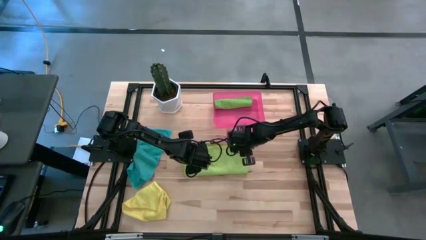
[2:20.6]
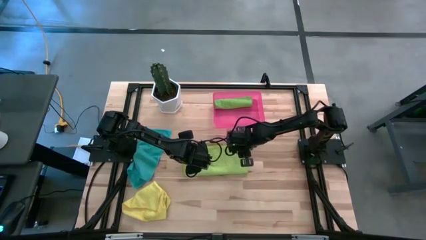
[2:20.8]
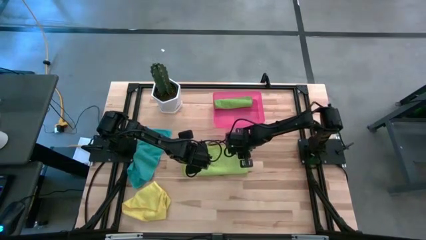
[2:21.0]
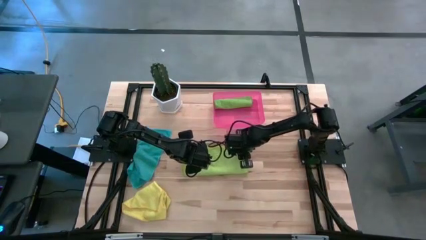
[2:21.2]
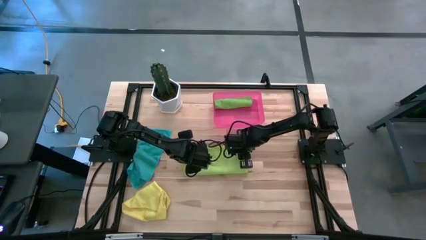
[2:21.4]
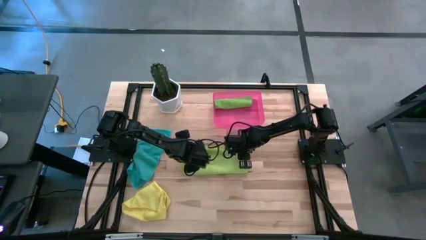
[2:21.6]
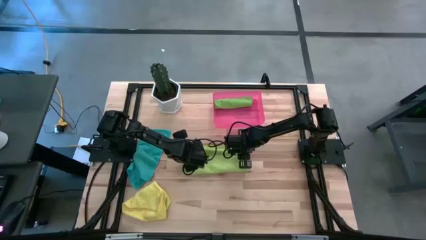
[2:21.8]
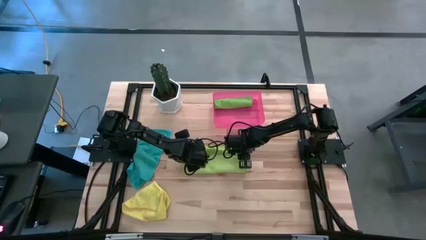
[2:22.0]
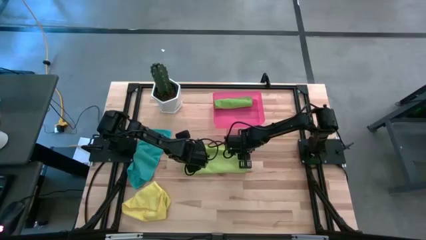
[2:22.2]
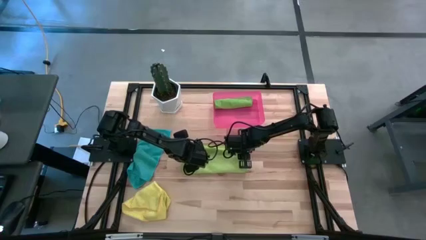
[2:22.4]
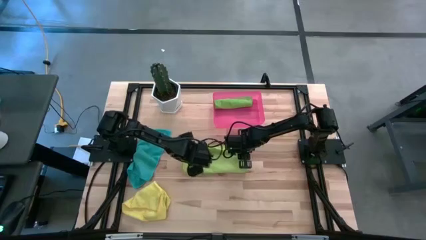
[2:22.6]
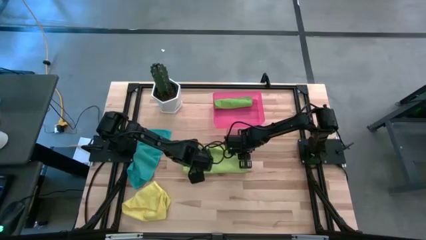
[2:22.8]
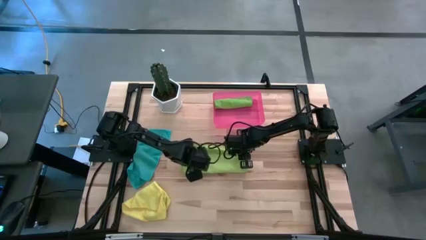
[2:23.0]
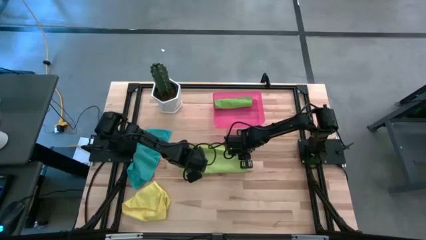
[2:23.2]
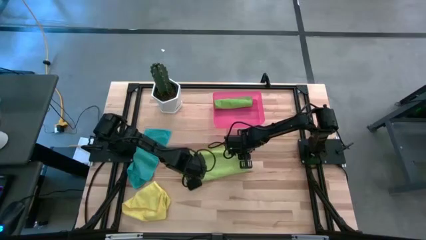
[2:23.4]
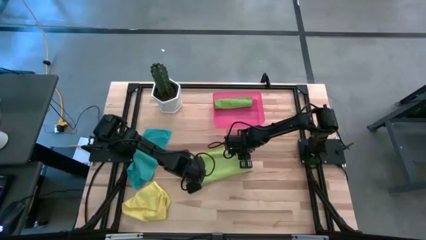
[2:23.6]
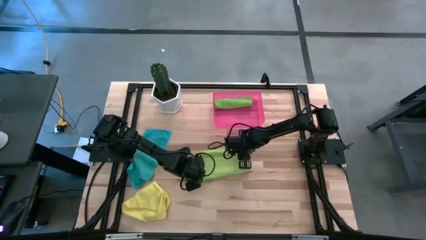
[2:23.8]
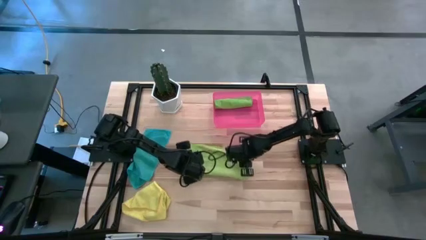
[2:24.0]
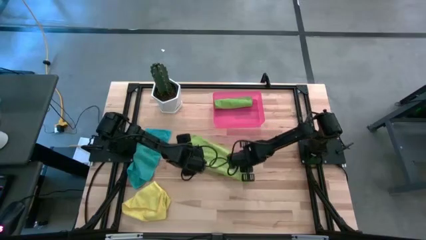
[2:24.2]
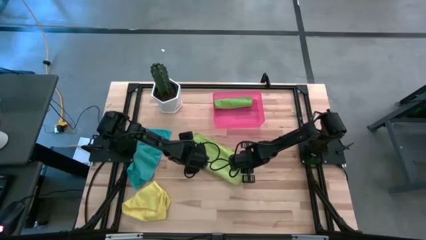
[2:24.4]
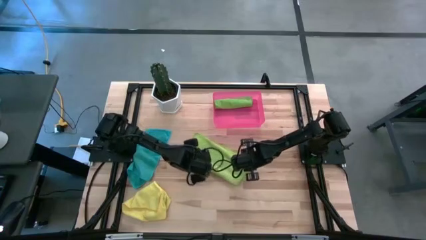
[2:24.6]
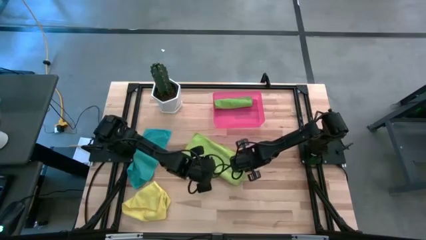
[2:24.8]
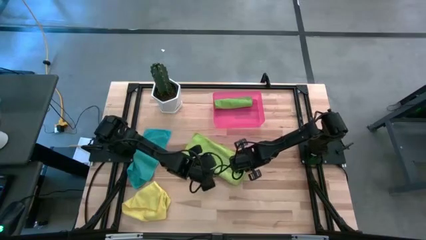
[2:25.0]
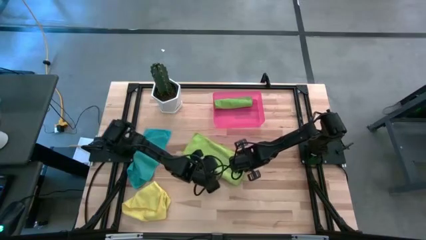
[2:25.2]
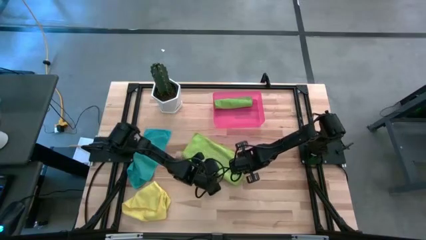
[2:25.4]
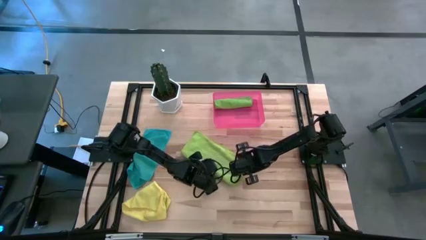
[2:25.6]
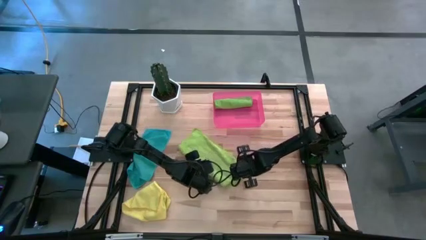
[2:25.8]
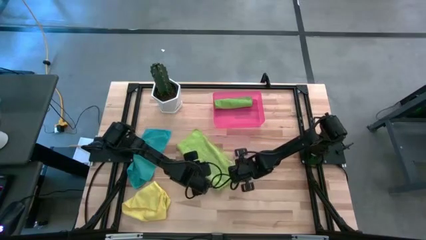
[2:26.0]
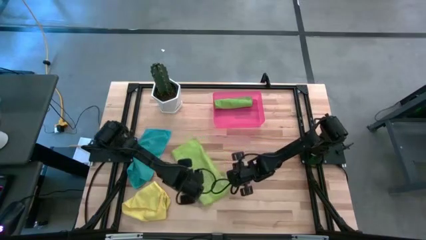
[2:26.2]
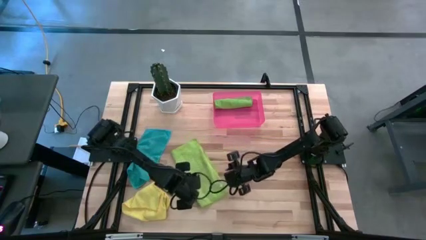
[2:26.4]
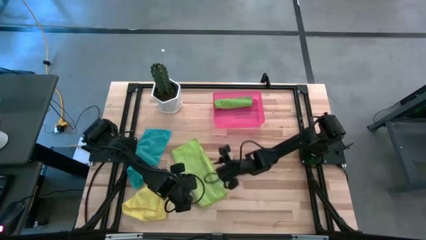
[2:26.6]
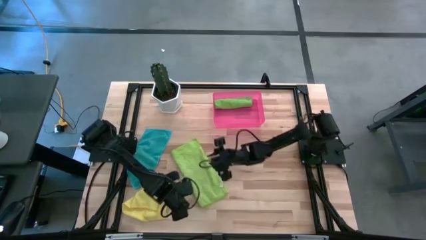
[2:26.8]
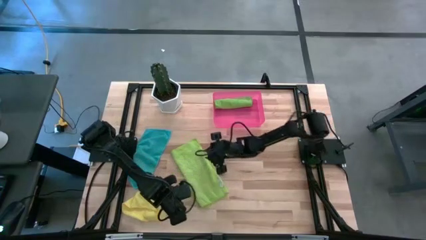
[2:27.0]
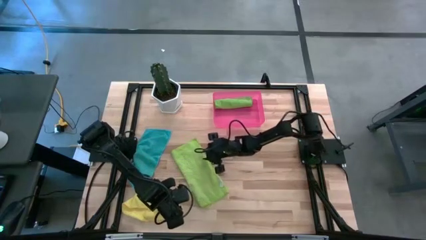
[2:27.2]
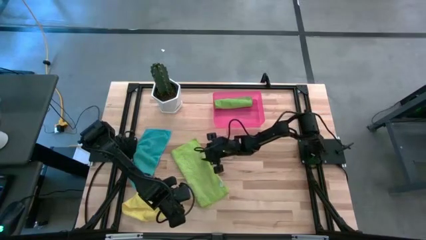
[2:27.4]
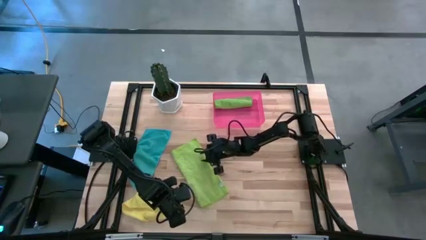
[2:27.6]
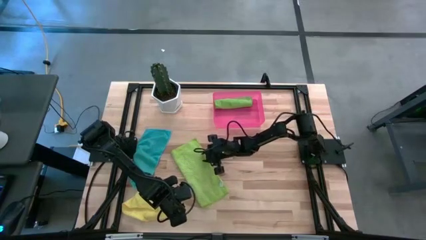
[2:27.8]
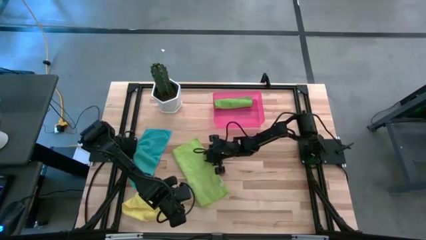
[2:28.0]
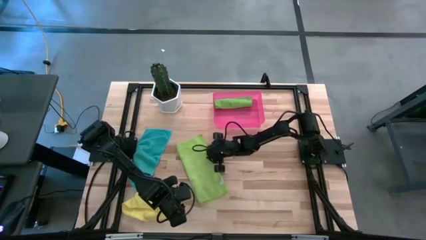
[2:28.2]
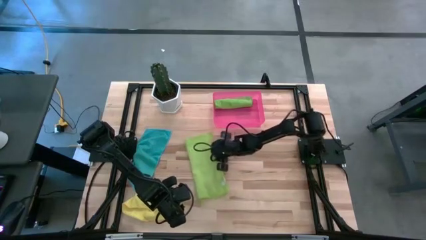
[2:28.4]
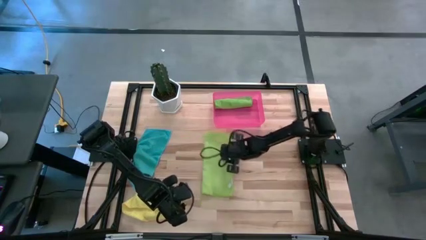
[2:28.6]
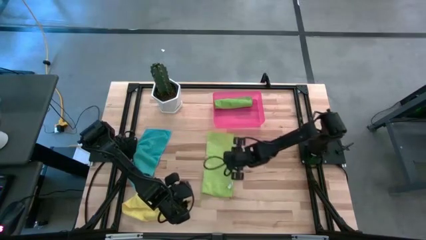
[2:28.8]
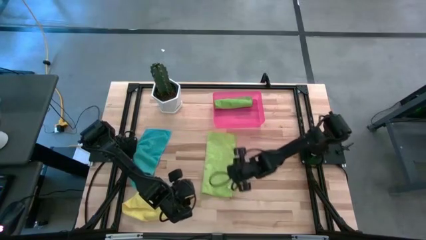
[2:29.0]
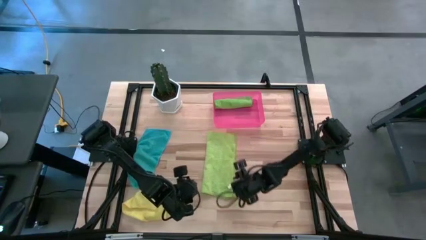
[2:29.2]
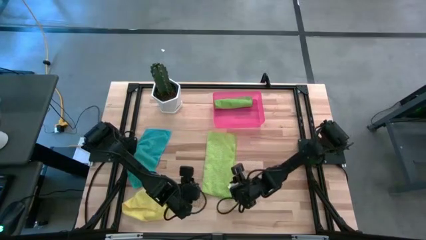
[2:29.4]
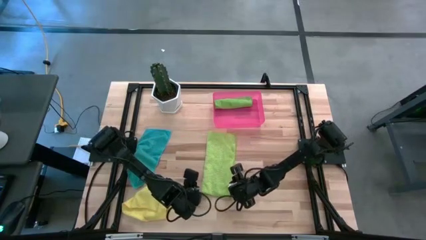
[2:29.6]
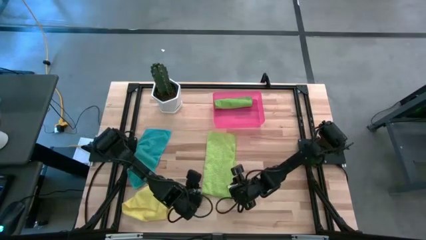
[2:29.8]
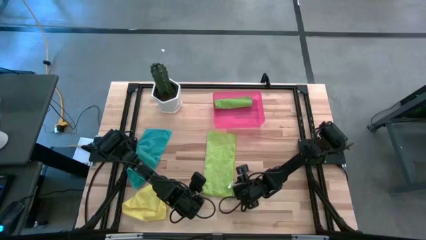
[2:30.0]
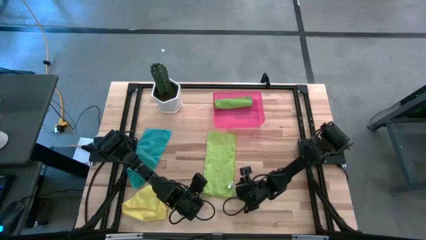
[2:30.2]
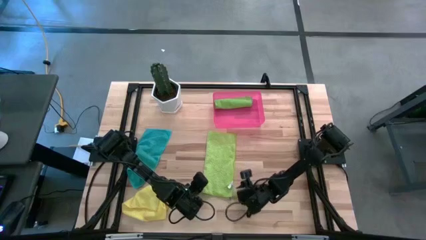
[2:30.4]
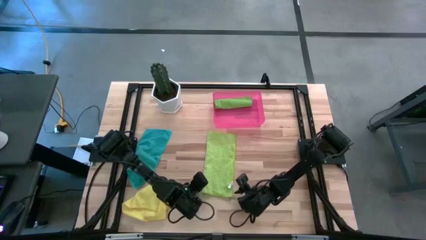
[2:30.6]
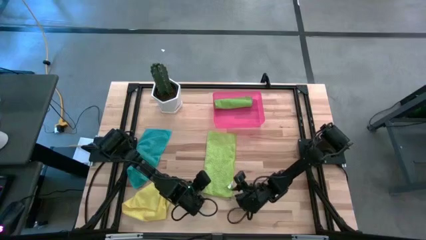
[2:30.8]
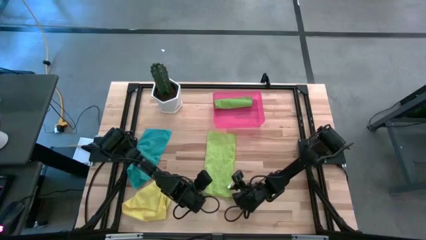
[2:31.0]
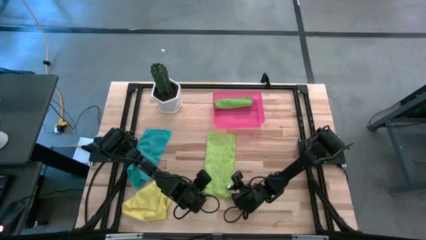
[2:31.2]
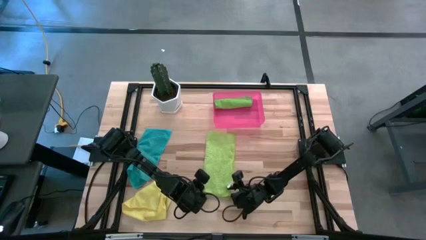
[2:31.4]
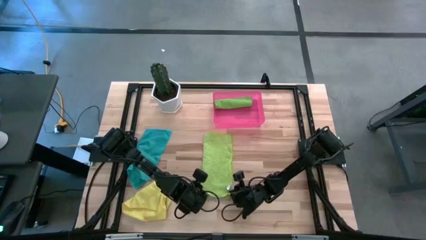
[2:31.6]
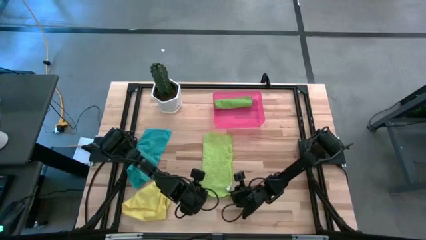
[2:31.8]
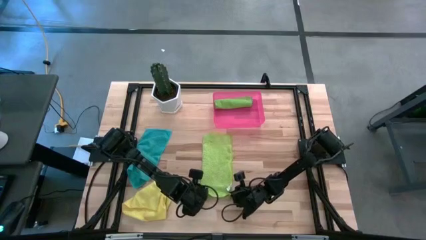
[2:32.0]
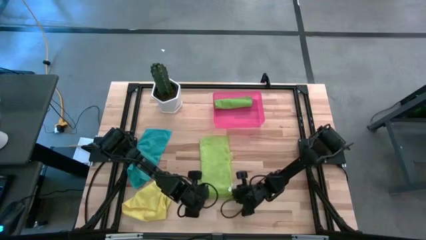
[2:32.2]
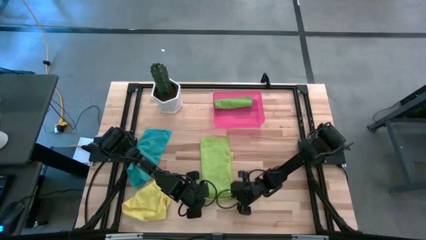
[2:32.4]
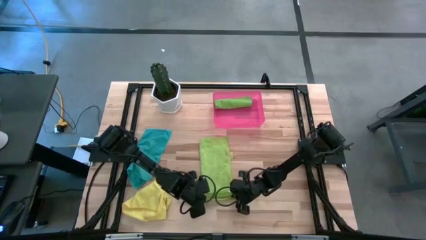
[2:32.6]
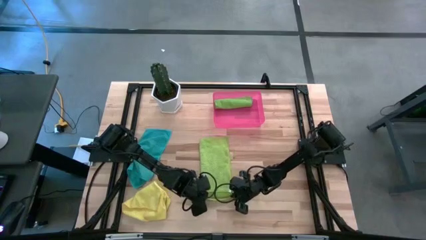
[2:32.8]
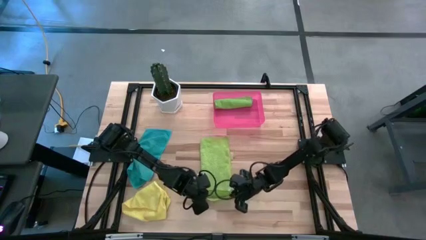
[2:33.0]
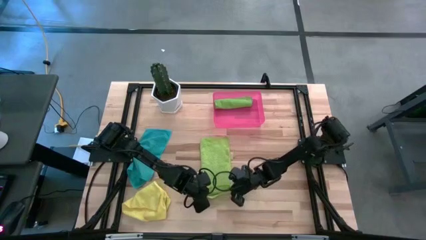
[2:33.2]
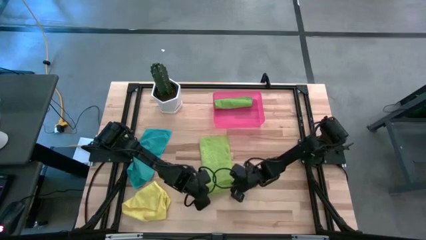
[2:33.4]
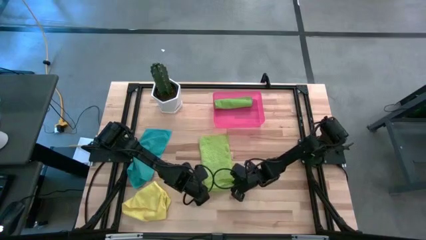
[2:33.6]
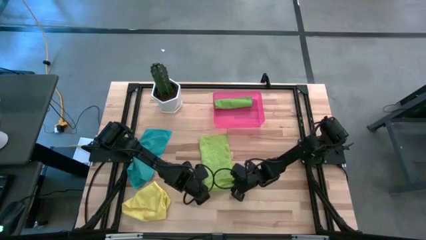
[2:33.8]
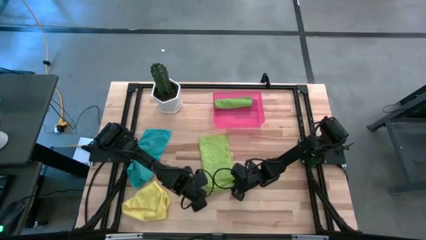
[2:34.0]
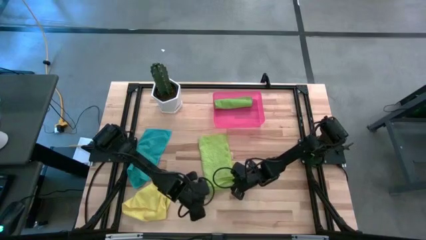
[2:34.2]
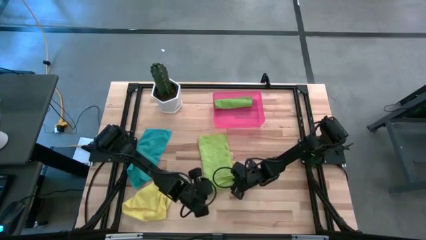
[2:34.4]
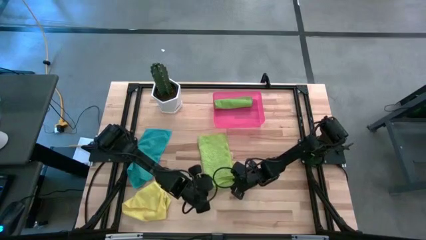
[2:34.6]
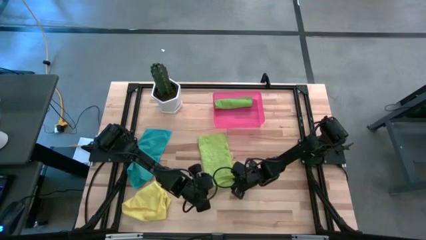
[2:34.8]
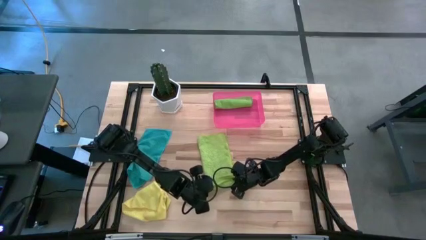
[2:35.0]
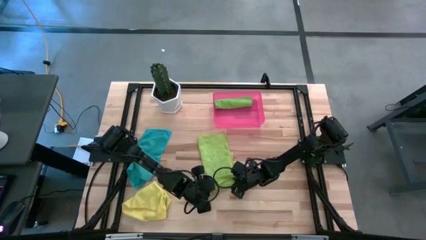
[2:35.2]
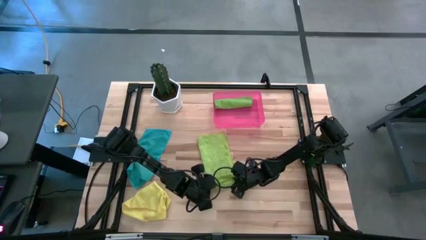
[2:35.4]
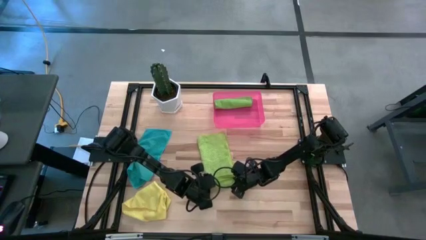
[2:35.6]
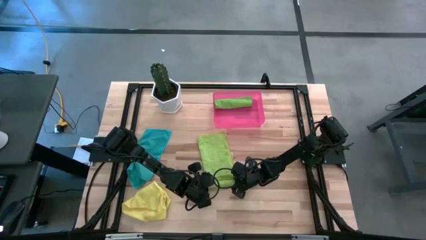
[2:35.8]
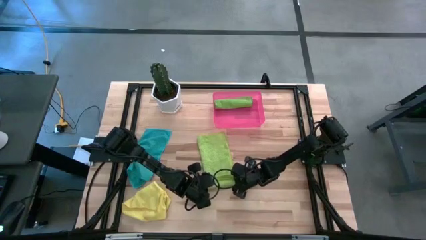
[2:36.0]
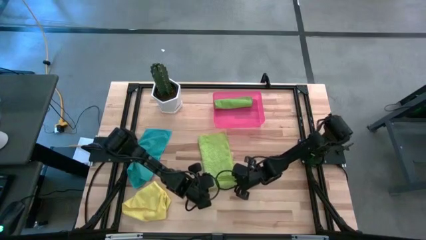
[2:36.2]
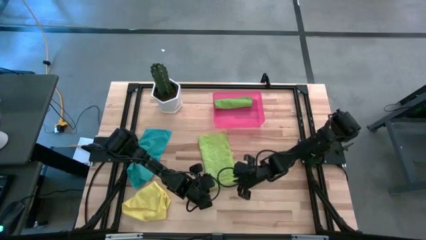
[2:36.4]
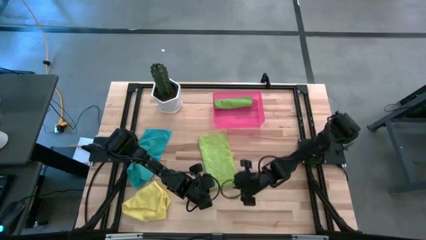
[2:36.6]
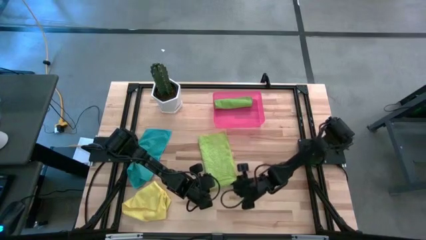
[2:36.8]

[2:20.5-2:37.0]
Task: Roll microfiber towels into tight, uniform cylinder then place into a basket
Roll the light green microfiber cloth
